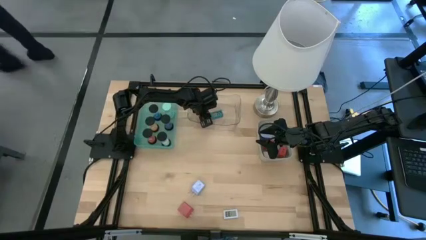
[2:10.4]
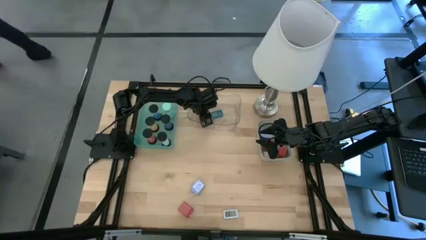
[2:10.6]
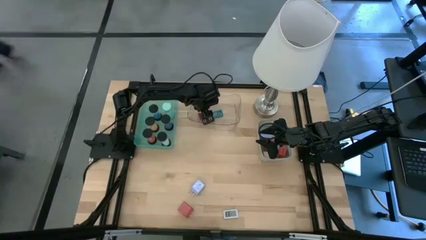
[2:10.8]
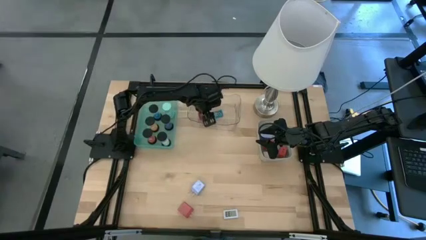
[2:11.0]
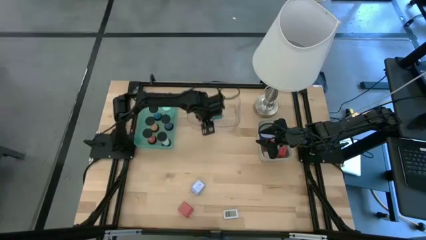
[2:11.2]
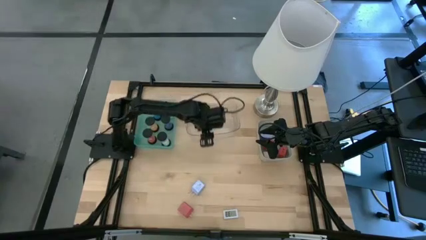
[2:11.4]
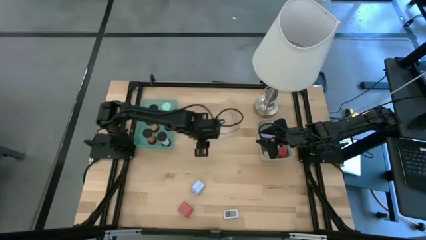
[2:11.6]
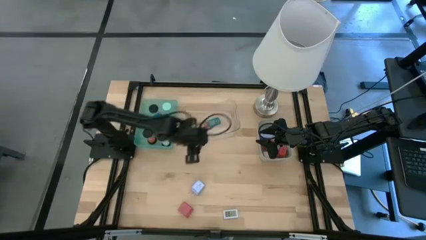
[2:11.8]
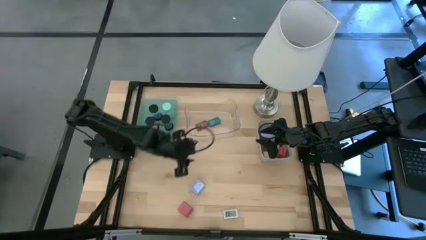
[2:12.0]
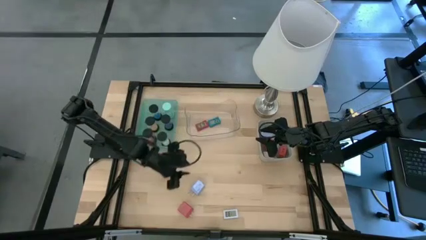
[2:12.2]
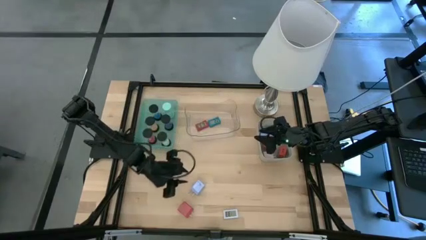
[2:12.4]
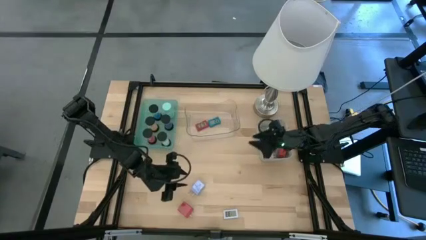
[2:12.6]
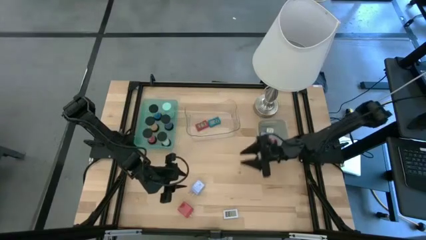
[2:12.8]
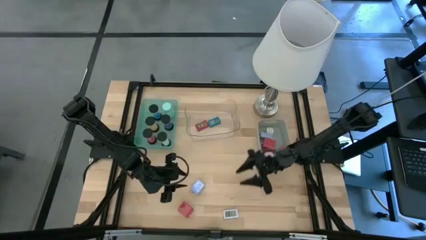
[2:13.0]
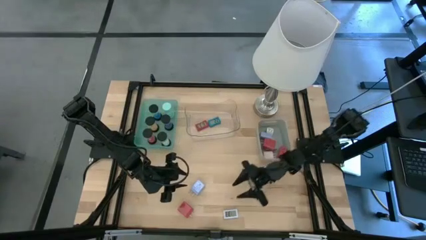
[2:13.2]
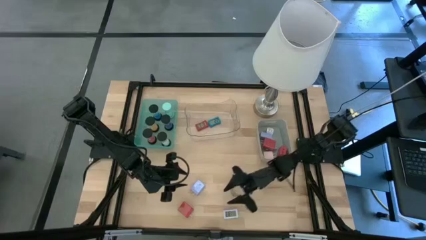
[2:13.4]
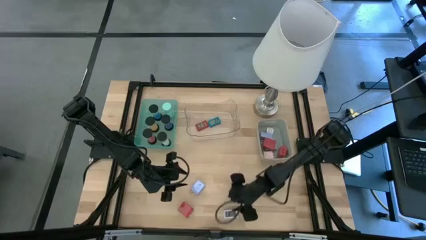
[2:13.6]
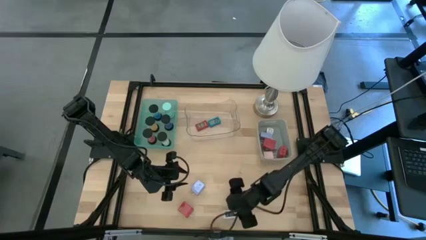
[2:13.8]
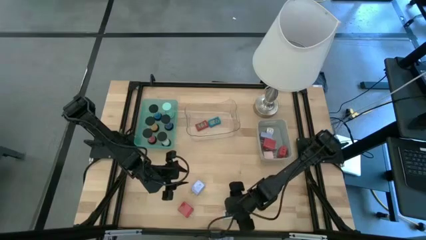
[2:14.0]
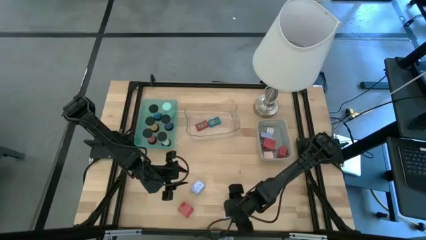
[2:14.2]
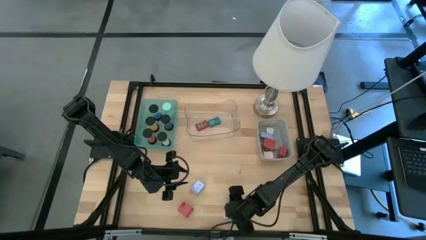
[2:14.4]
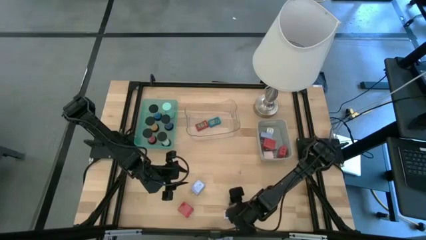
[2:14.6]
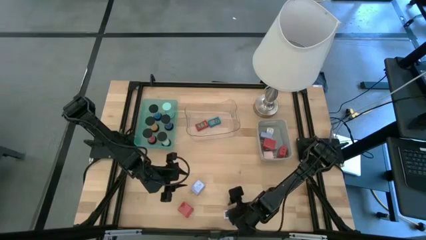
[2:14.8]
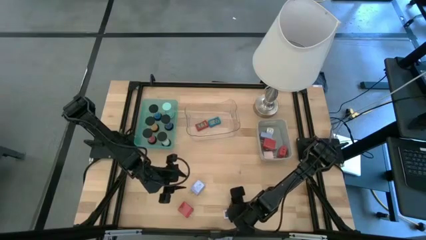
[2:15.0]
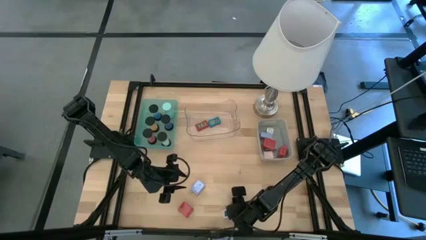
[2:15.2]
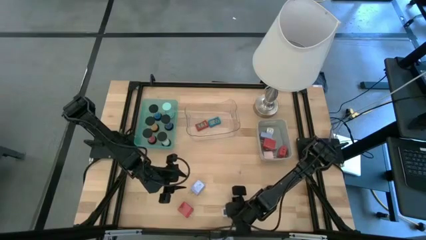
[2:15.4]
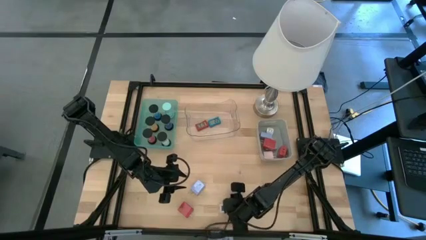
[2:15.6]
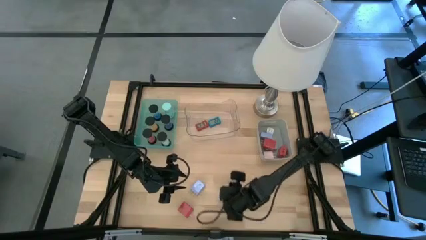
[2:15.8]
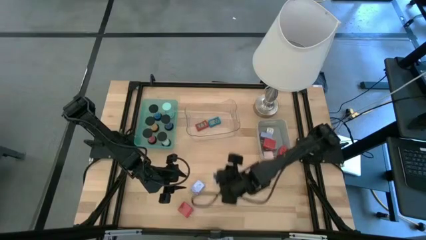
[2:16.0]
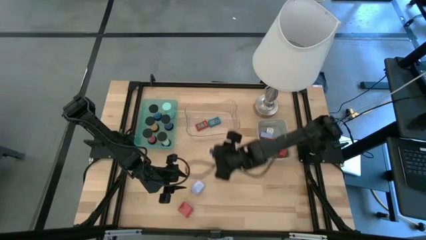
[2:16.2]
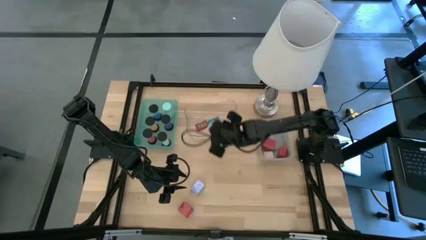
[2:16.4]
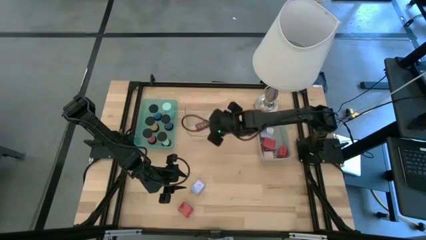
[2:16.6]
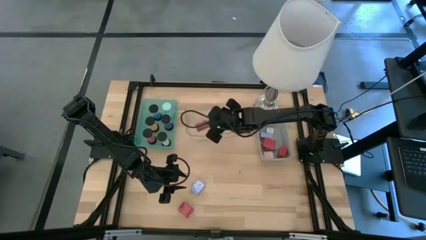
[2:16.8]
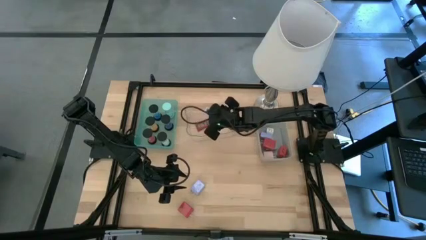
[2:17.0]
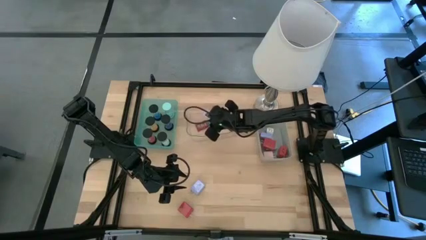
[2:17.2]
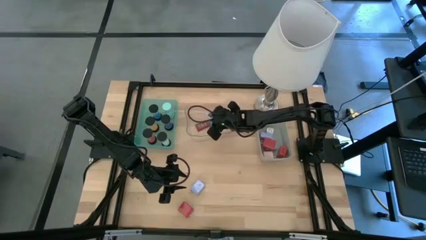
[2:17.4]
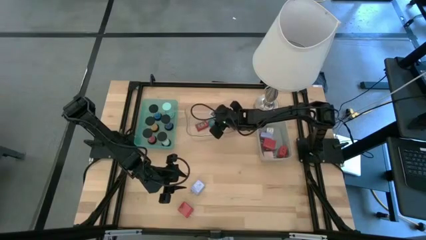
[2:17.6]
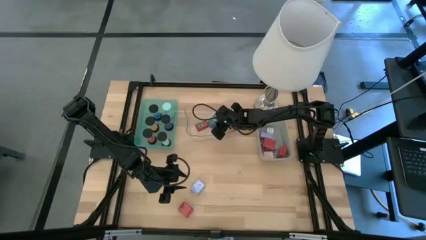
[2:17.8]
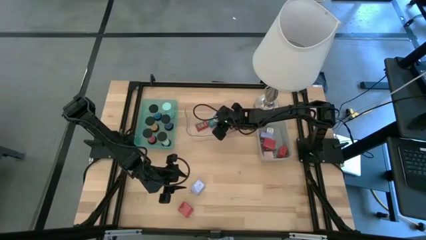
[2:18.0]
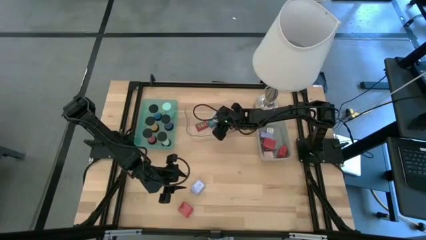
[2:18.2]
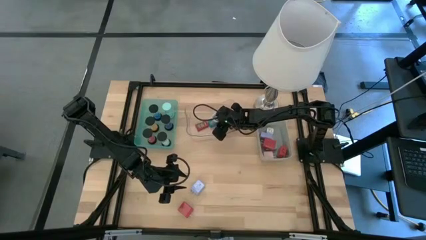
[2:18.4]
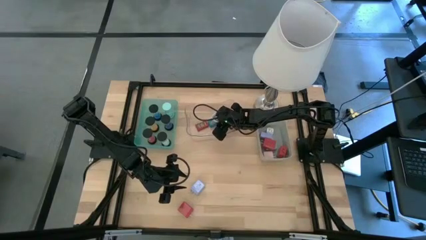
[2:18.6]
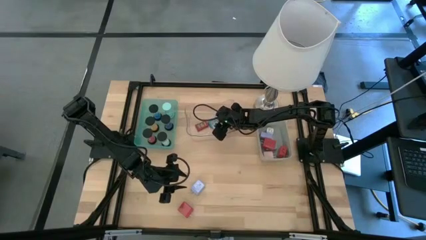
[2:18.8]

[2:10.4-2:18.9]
Task: Pick & Place Office items
Put the white digital timer into the transparent bin

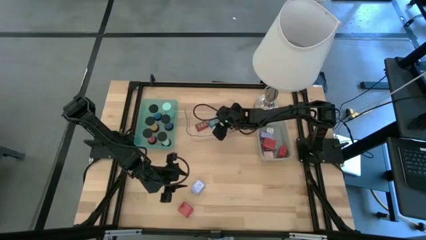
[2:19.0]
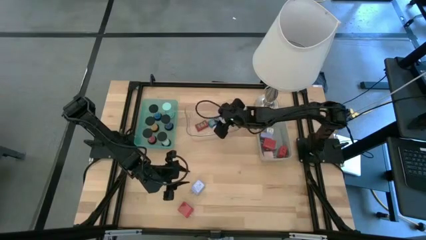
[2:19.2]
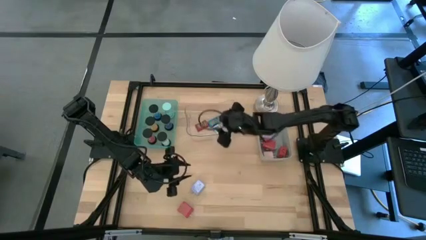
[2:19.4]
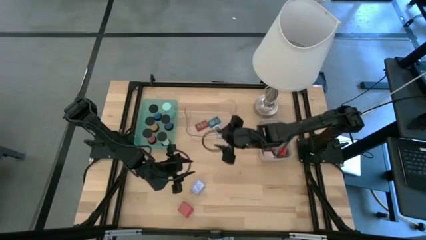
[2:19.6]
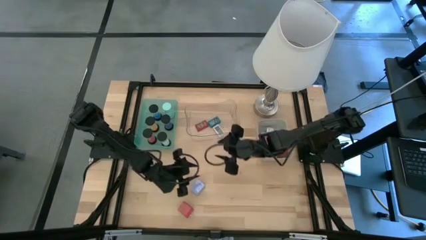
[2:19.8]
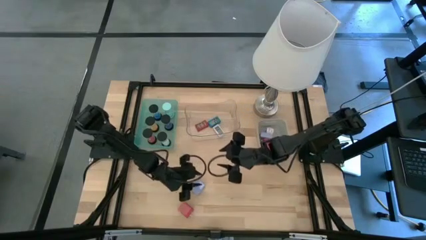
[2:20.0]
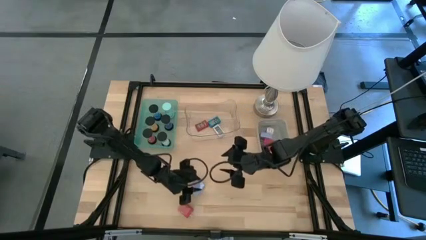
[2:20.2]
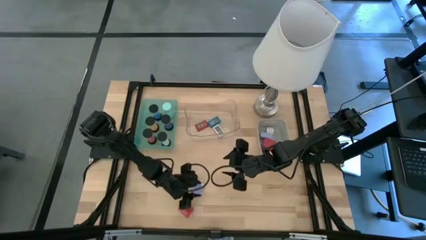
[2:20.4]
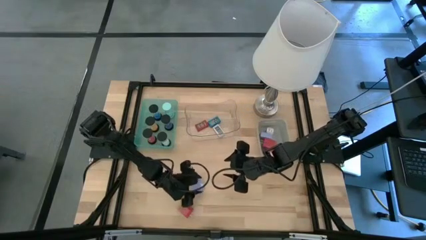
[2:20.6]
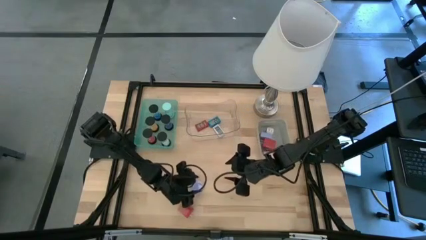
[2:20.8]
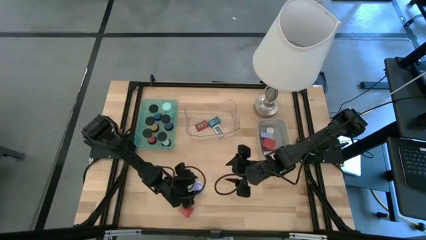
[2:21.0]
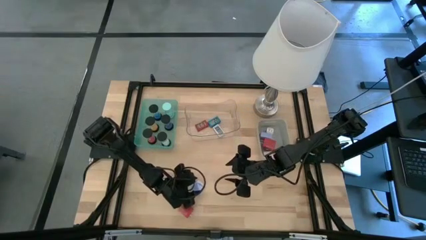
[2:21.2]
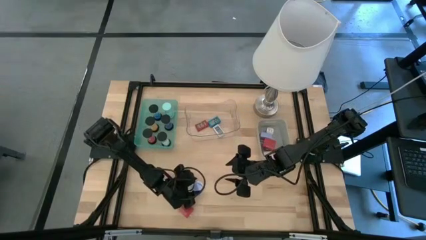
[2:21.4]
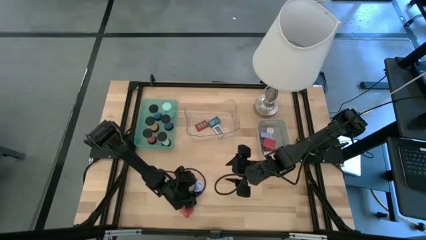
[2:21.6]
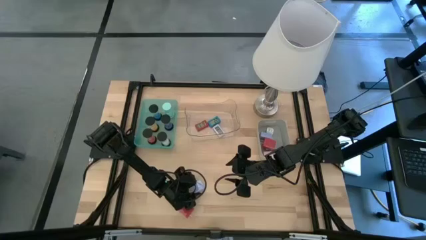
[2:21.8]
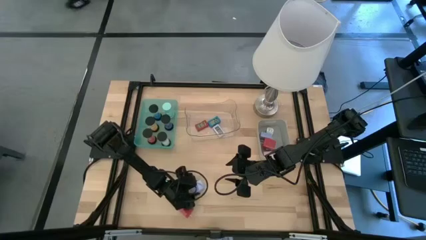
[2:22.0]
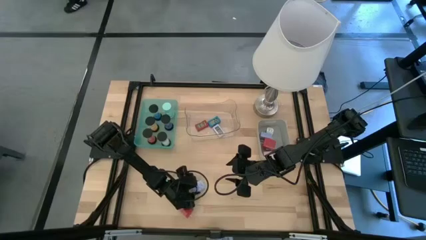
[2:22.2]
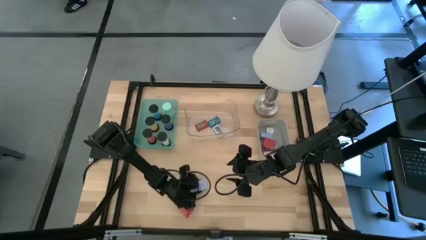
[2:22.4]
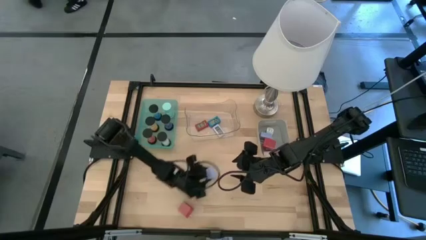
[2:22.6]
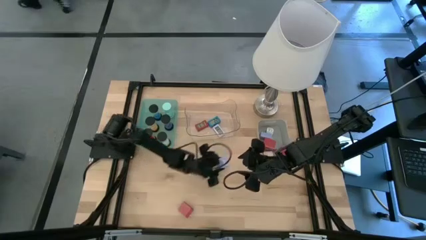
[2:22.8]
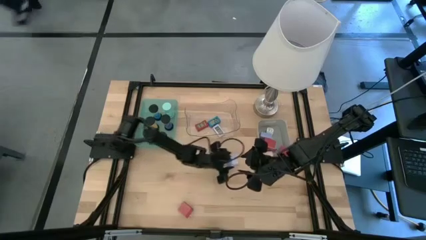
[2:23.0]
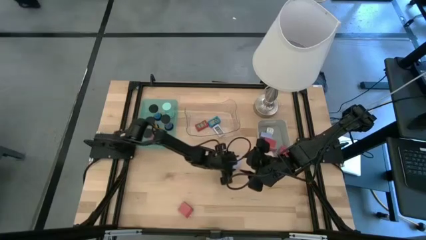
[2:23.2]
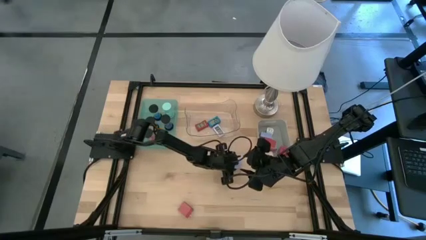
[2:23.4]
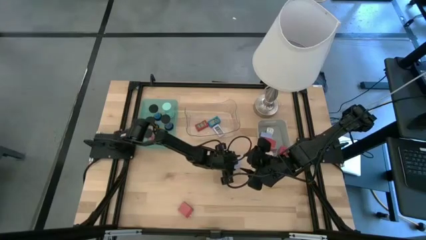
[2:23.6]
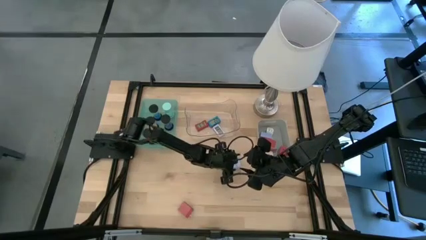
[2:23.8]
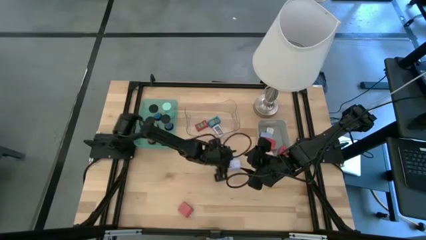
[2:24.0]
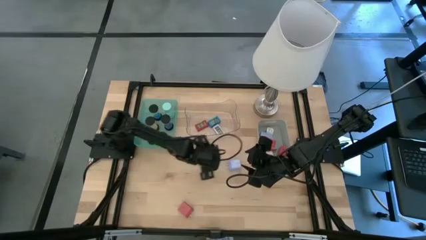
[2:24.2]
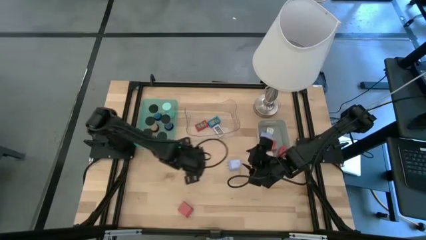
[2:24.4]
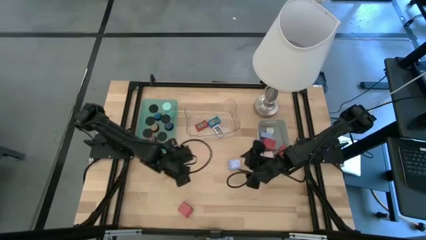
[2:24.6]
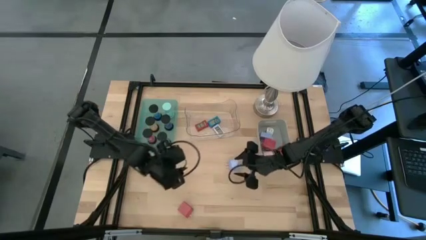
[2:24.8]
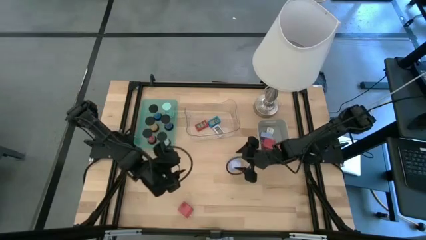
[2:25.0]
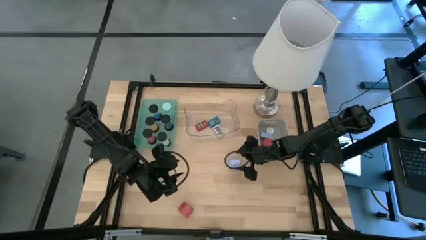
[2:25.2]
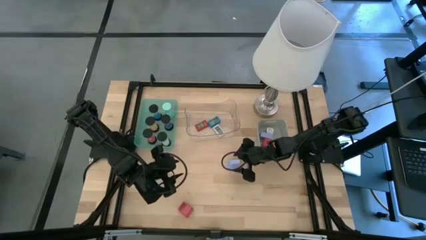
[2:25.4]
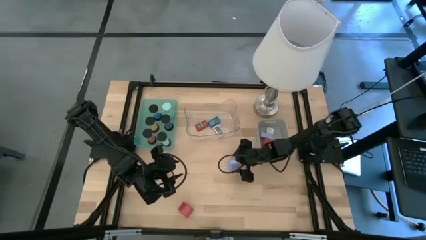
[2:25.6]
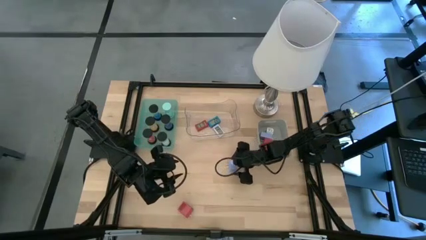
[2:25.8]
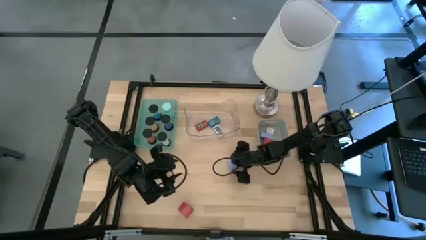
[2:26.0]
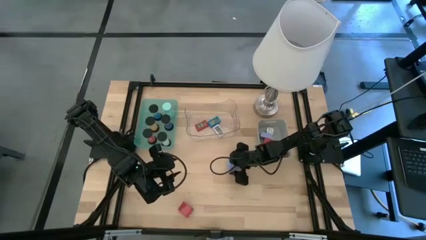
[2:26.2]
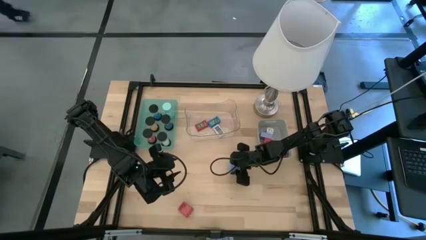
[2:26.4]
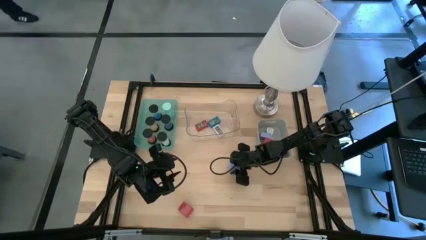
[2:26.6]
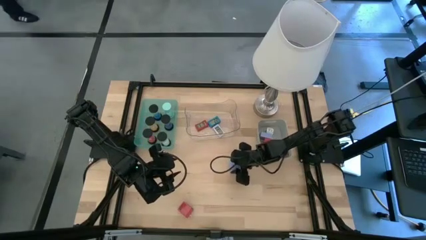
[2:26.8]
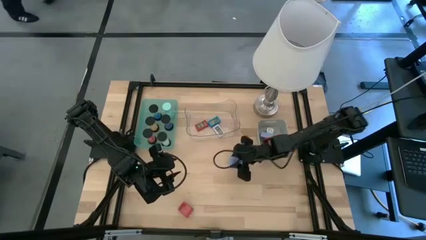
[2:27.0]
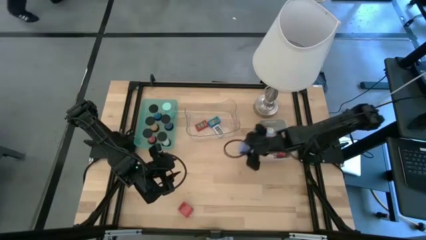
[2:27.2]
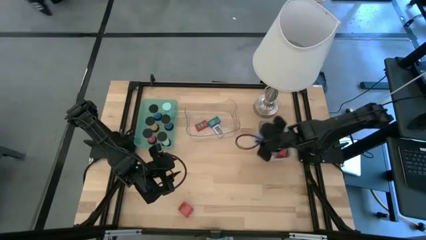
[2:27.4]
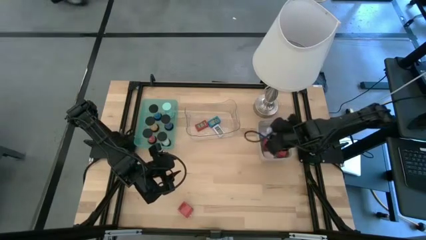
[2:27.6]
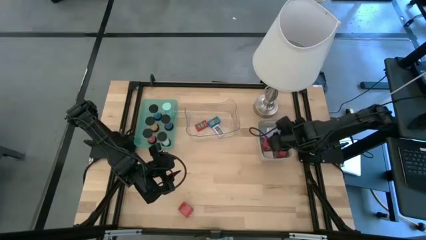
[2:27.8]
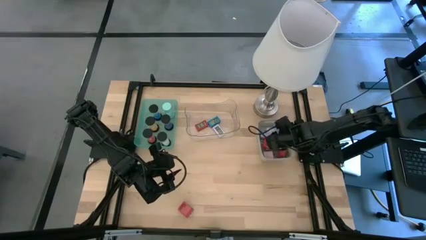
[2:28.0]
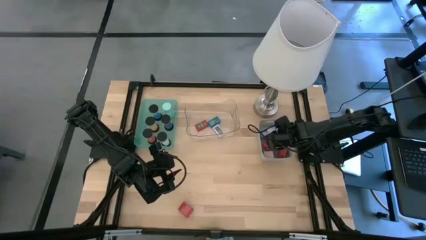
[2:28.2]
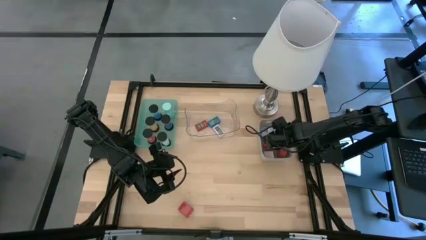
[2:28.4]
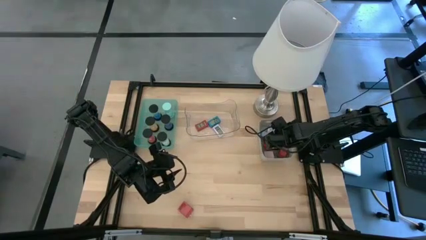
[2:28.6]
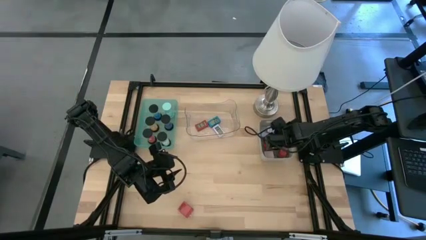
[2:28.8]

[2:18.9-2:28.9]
Put the blue charger adapter into the gray bin
